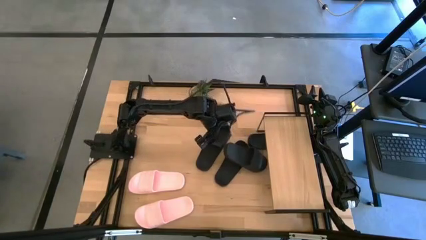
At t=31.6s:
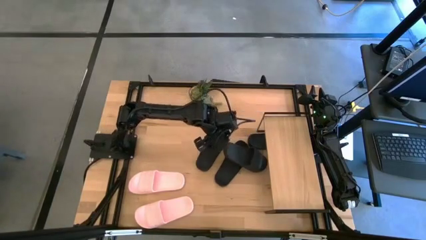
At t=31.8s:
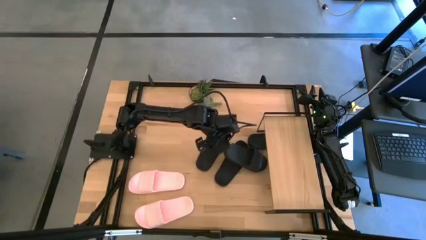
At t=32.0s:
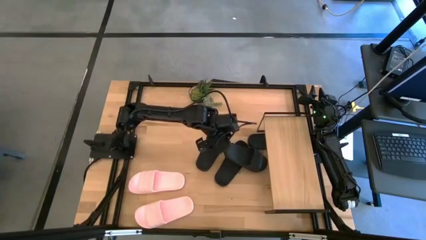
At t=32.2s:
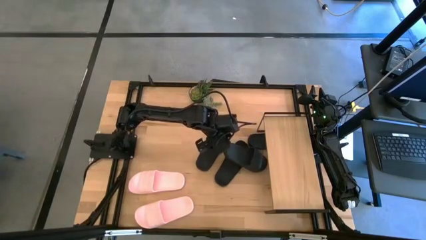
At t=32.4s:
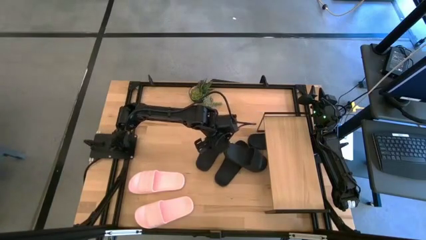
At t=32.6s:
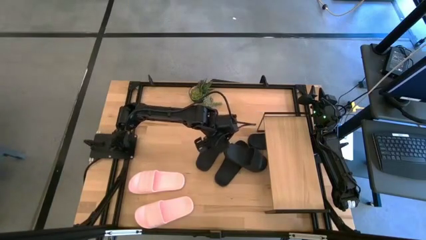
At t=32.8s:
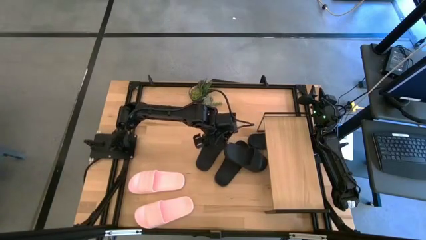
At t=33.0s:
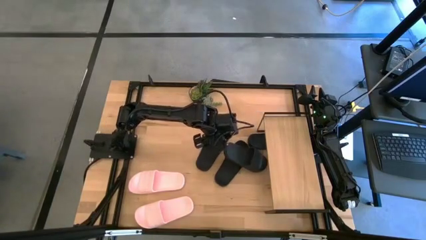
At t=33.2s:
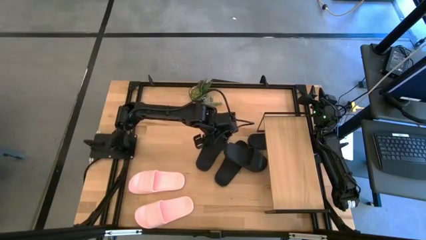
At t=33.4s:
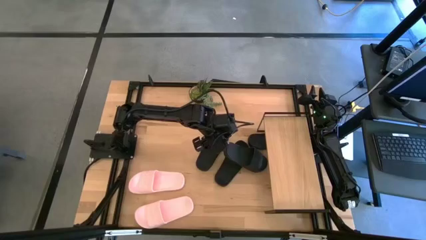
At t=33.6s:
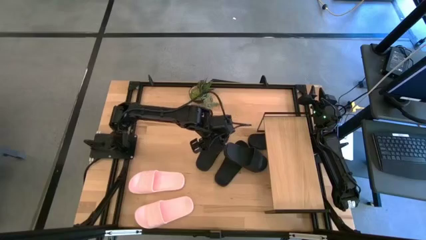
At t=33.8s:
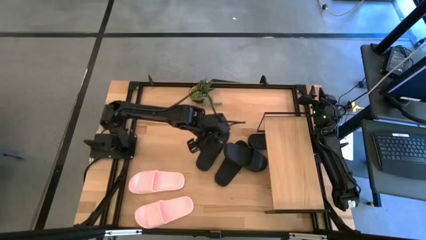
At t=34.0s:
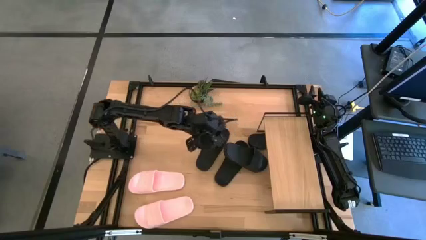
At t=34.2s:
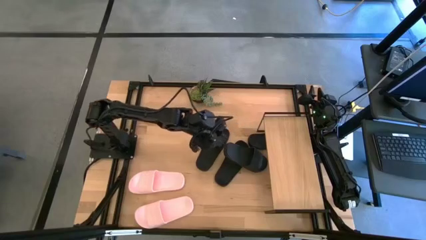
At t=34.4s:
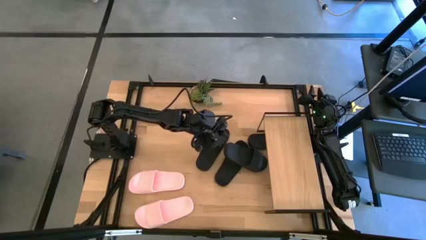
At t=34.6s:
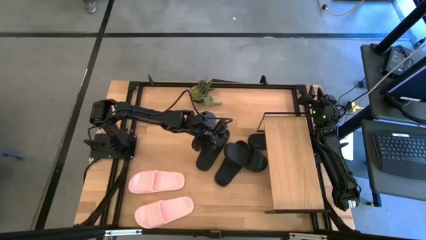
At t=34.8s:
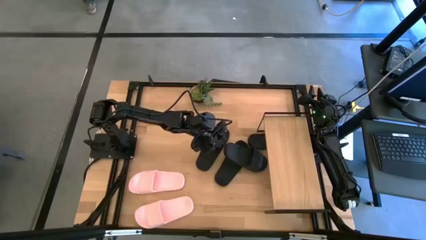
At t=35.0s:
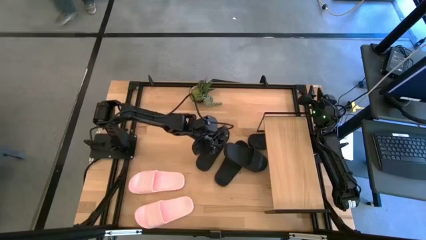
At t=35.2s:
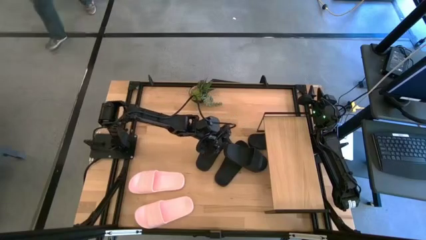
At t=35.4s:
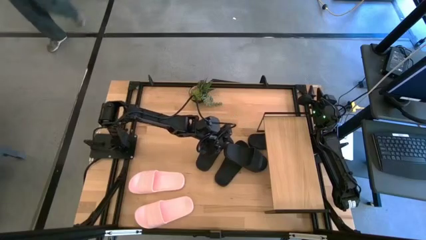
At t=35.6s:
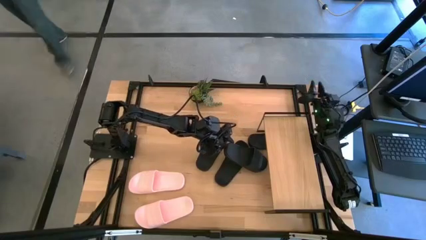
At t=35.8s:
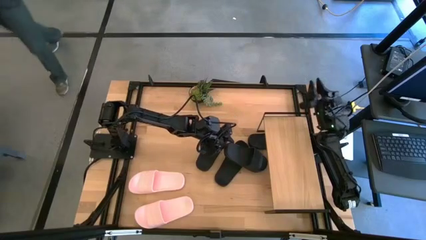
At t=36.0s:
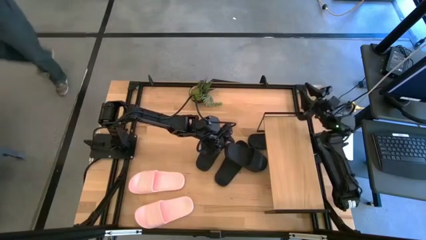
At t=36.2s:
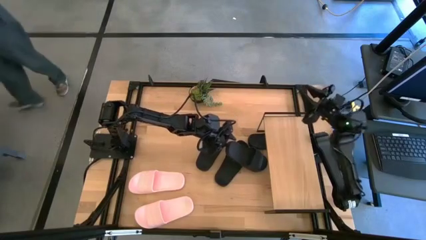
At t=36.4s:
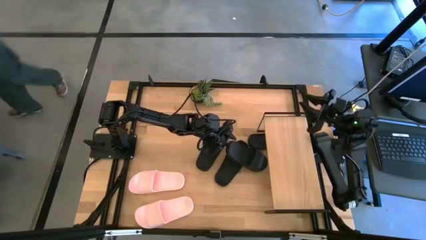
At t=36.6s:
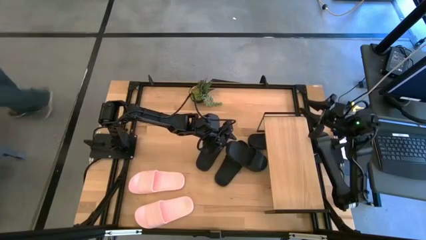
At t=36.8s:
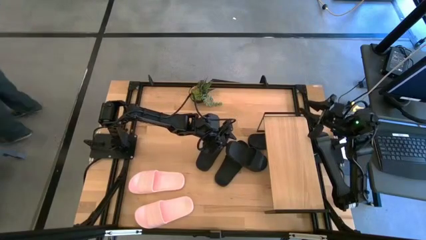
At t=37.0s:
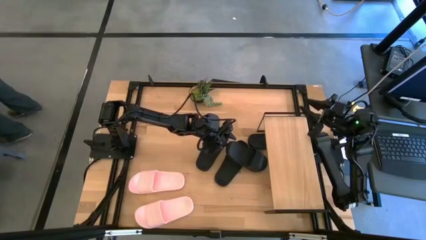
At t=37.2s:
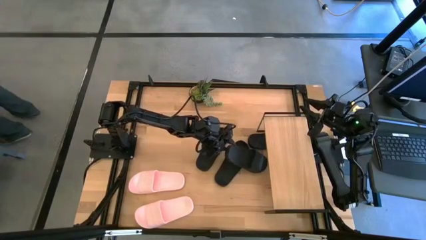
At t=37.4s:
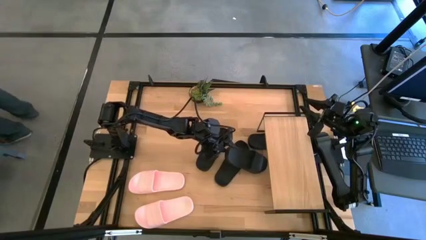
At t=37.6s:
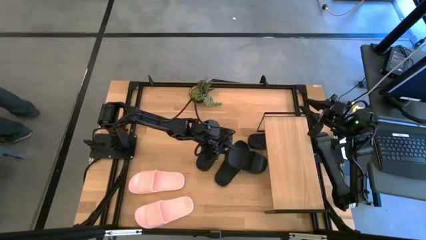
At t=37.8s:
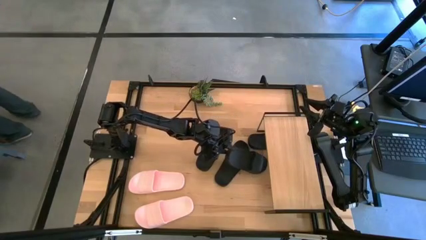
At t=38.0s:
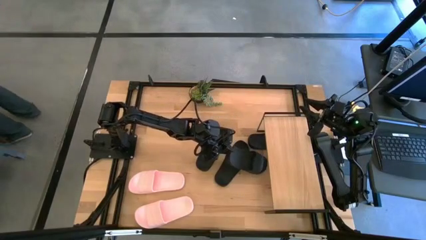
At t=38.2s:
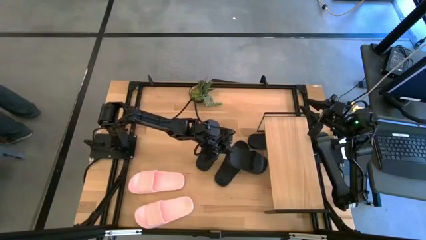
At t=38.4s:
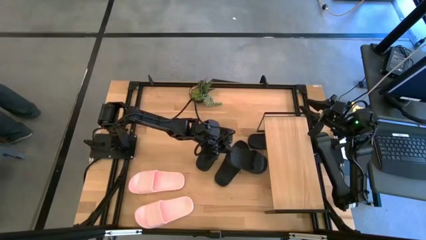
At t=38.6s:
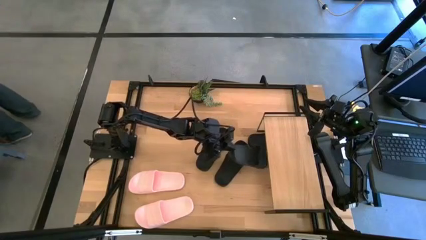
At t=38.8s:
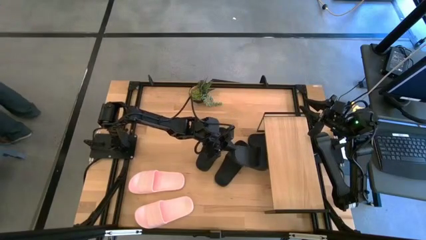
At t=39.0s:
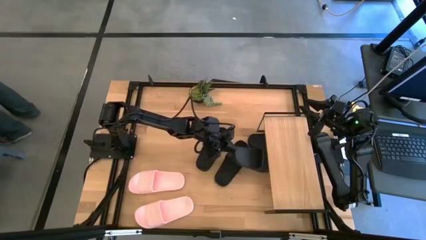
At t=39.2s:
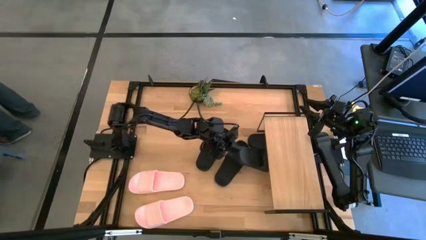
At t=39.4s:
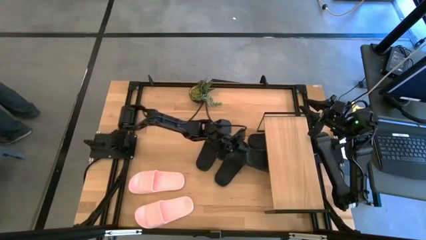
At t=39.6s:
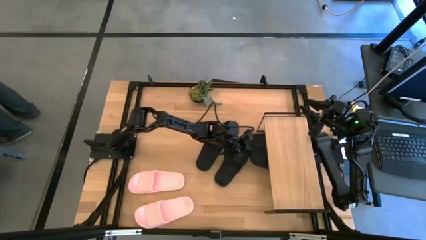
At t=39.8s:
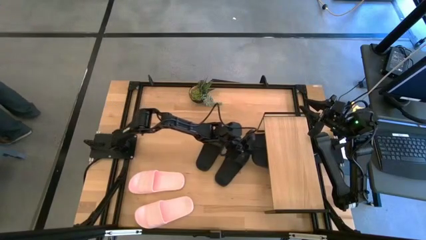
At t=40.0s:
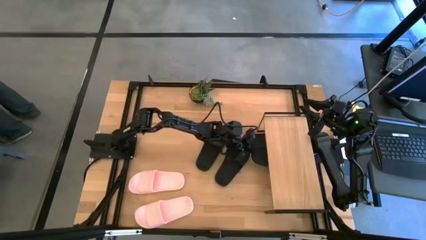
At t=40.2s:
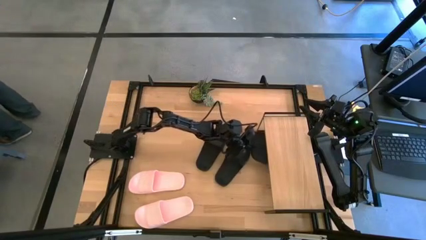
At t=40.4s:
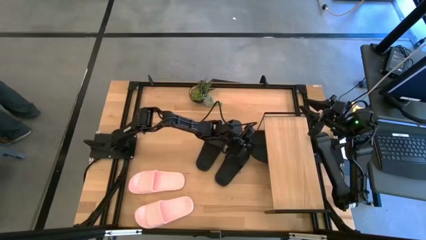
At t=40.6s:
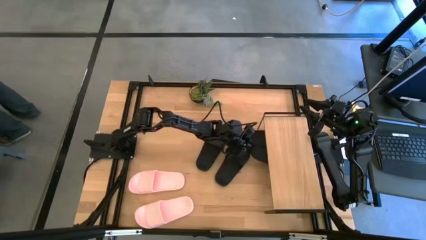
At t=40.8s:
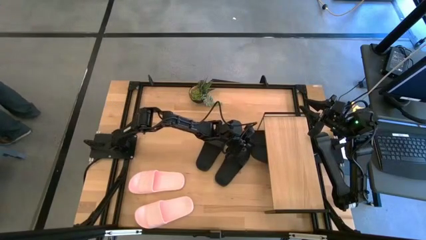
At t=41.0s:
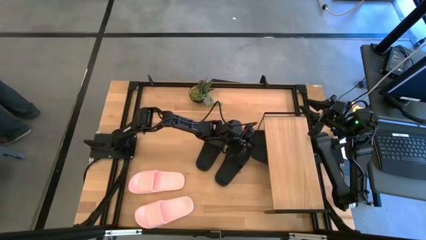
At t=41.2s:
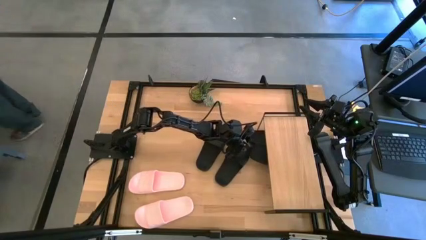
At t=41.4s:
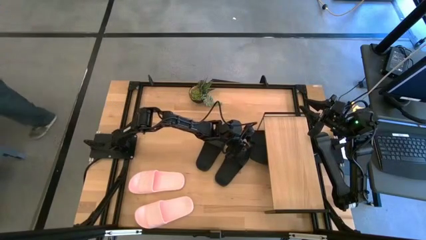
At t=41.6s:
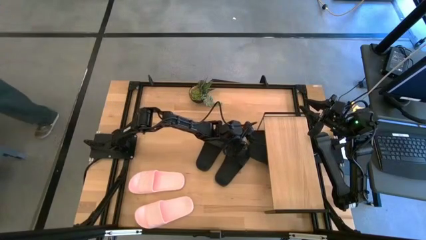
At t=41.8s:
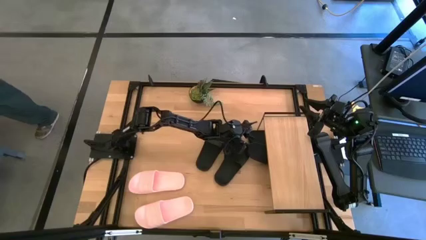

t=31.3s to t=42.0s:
Task: Pick and place slides into the shelf
Put the black slides under the shelf
